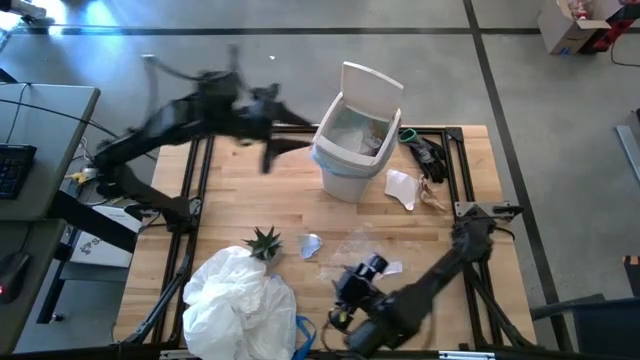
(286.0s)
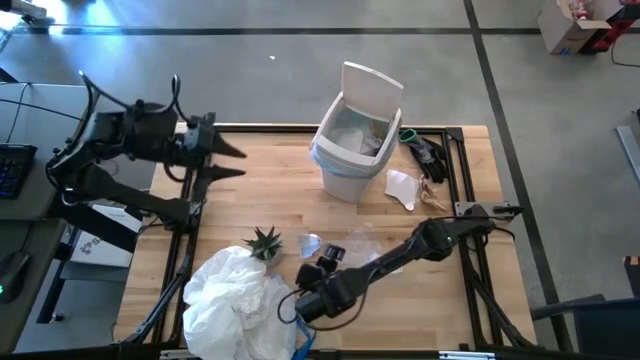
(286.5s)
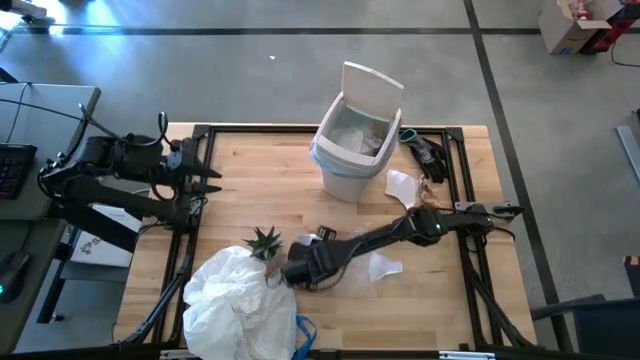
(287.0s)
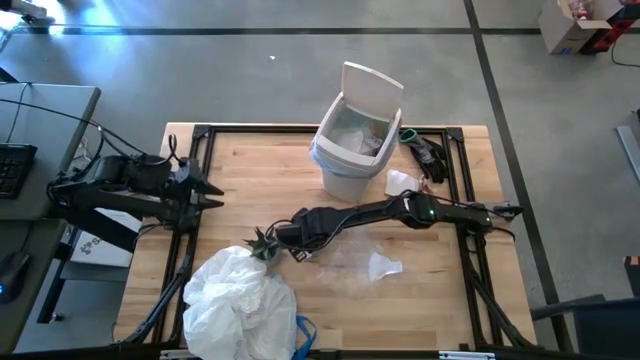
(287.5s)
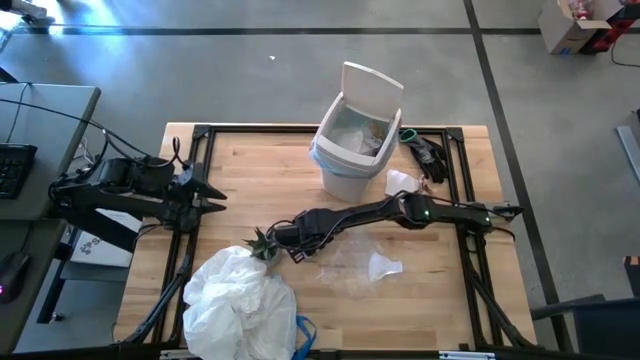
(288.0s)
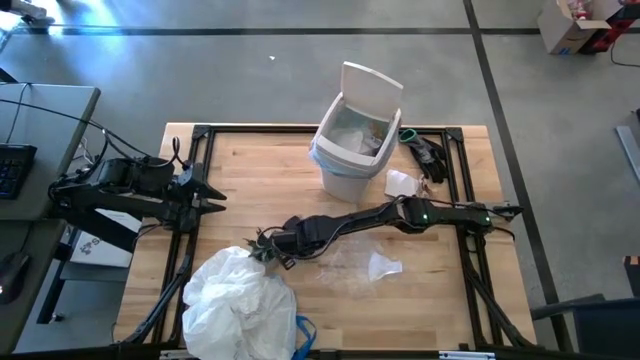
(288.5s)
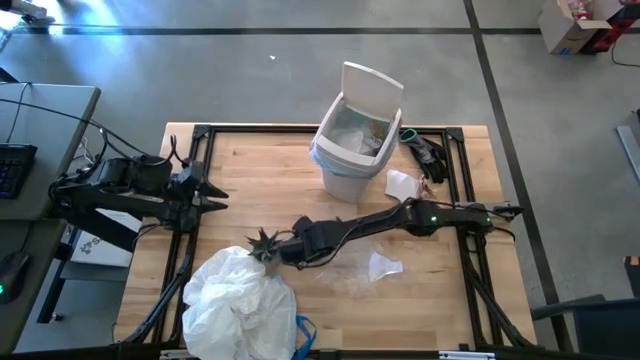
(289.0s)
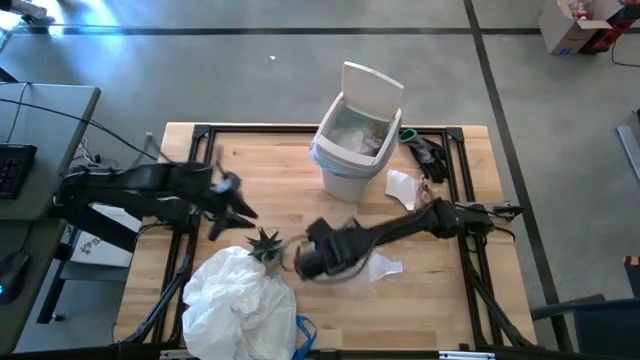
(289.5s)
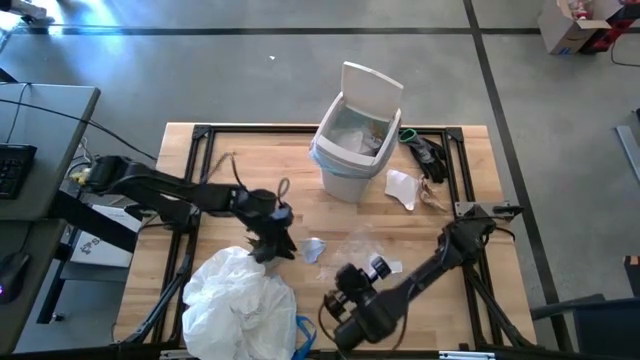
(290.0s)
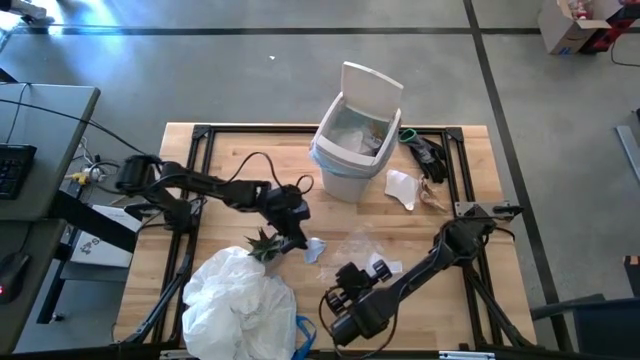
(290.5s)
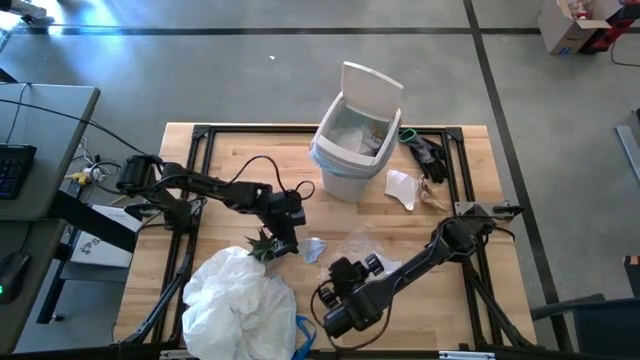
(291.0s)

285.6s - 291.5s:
Task: place trash/remove bag and relplace
Put the white paper into the trash bin

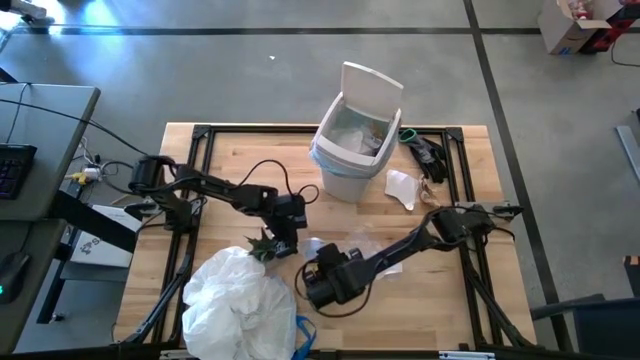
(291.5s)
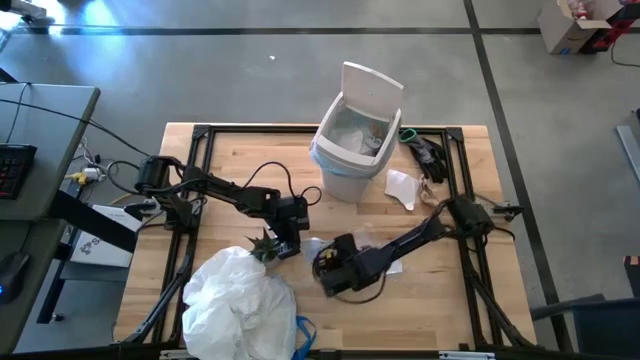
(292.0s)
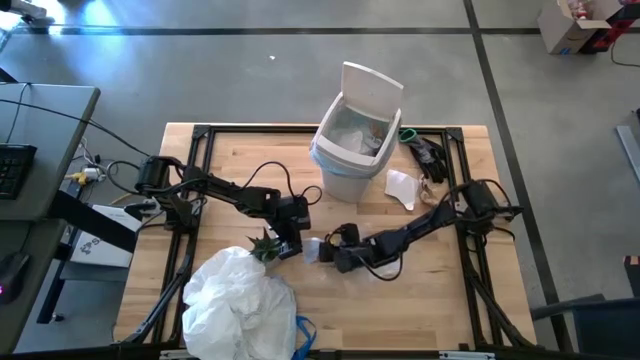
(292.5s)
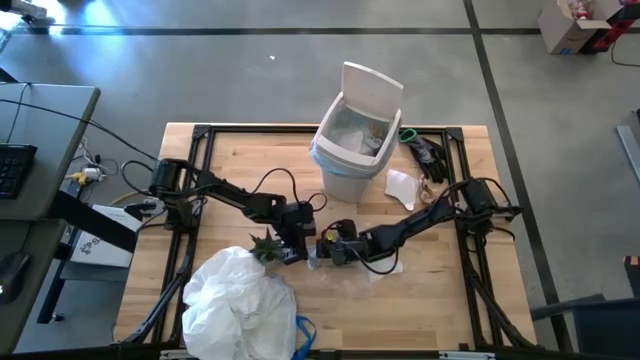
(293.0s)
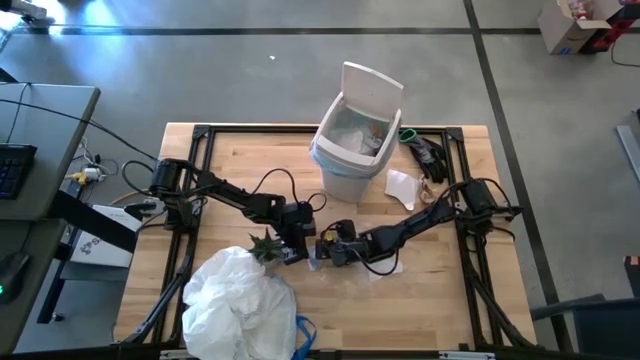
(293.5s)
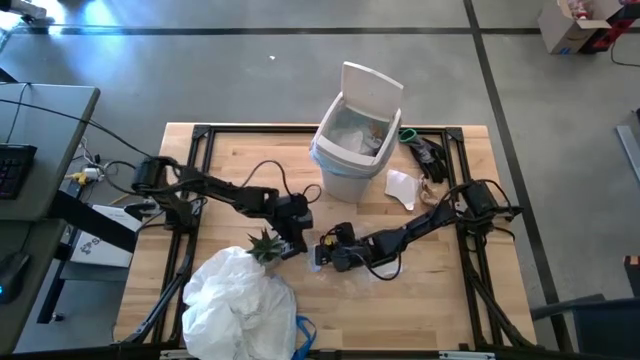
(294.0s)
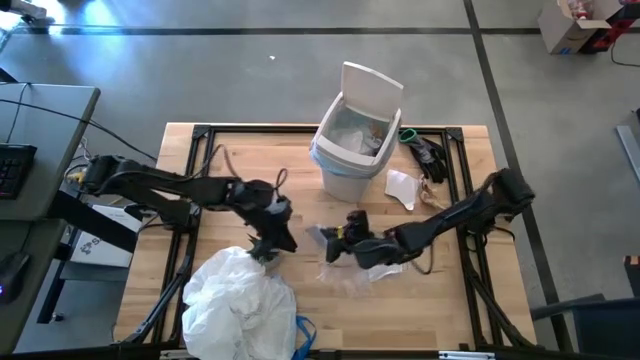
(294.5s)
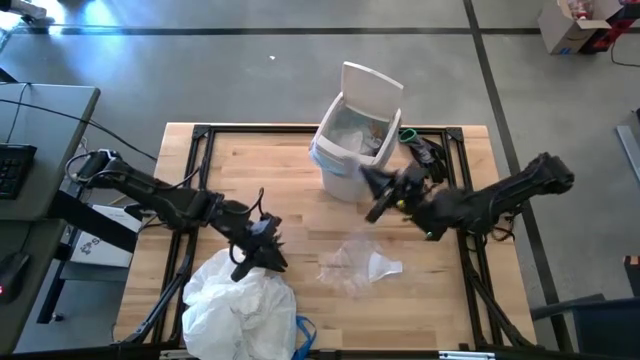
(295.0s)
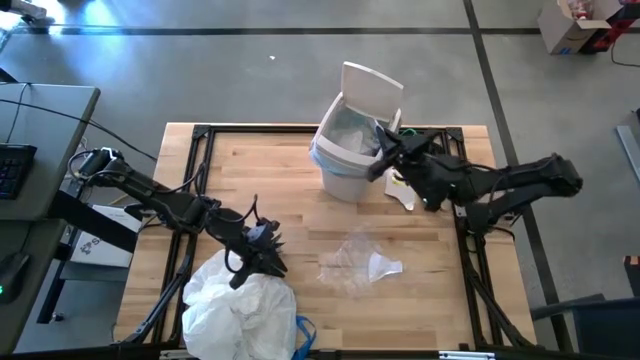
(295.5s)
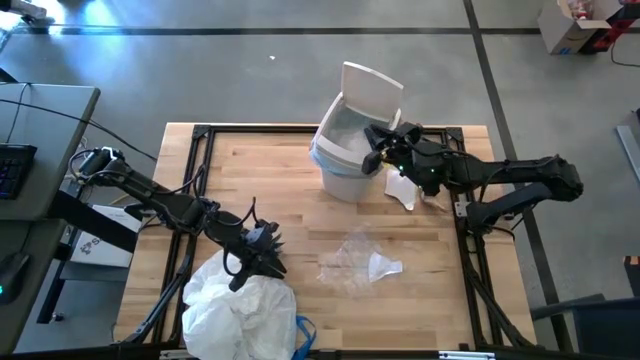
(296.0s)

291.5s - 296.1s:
Put the white paper into the trash bin

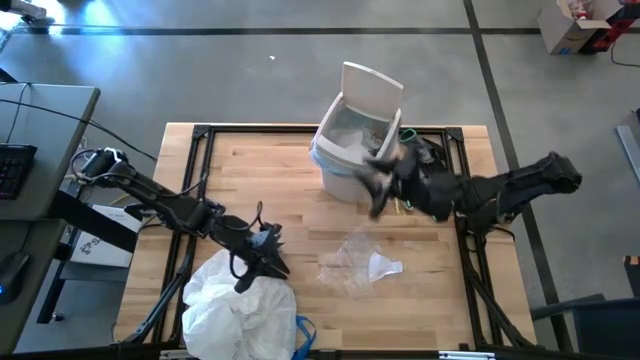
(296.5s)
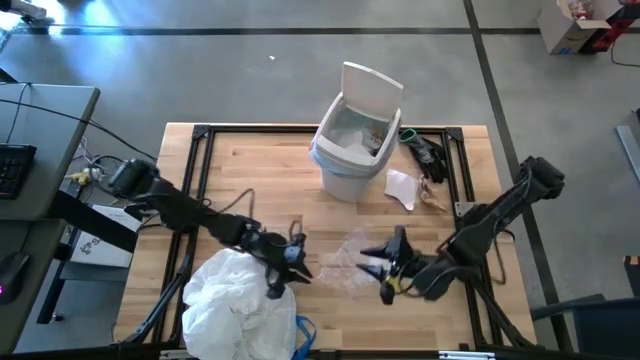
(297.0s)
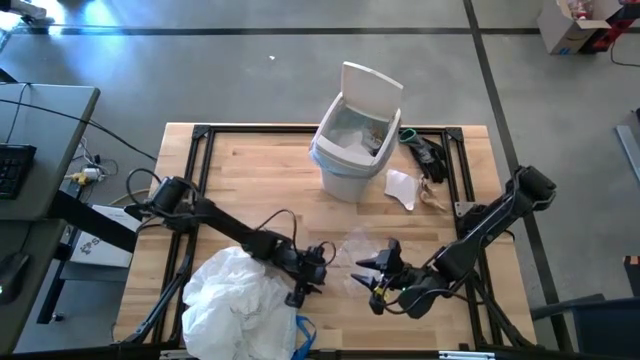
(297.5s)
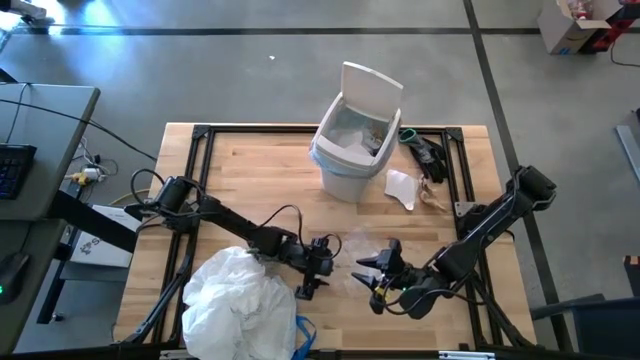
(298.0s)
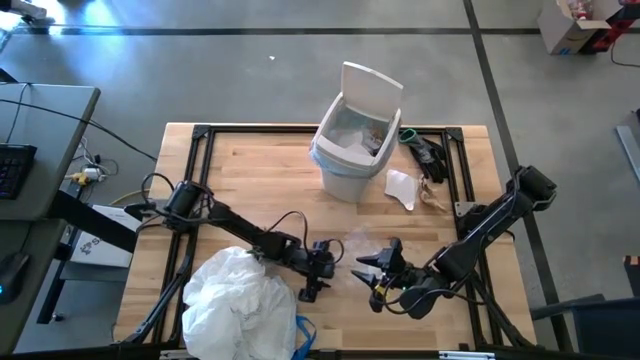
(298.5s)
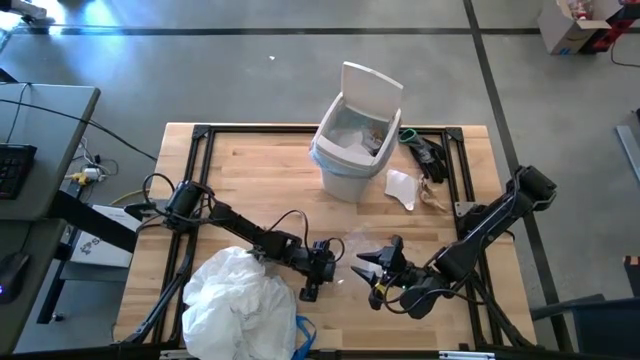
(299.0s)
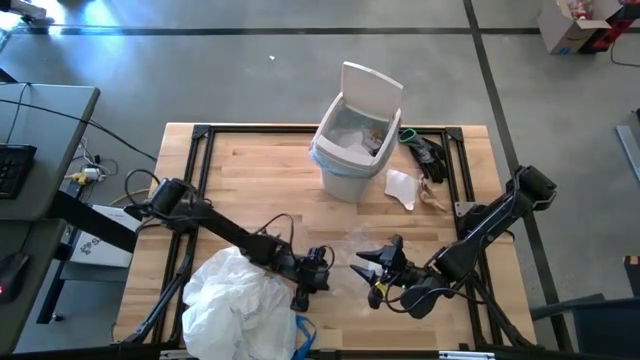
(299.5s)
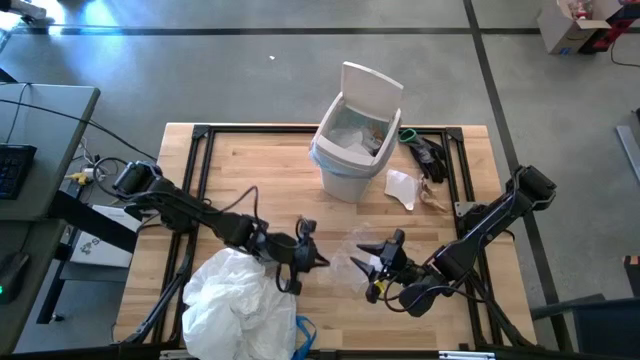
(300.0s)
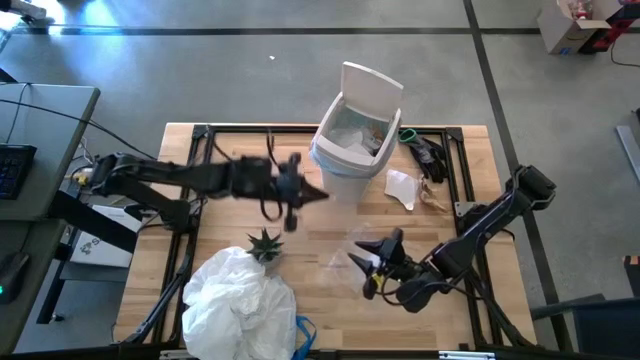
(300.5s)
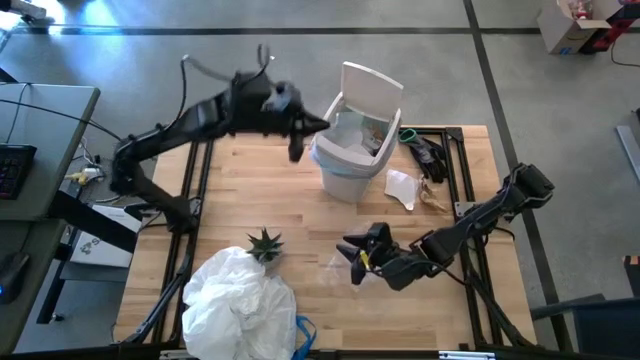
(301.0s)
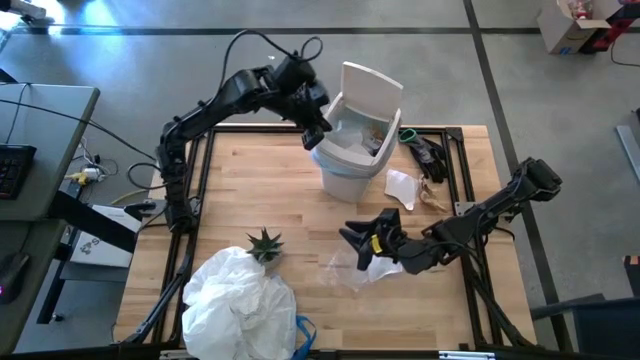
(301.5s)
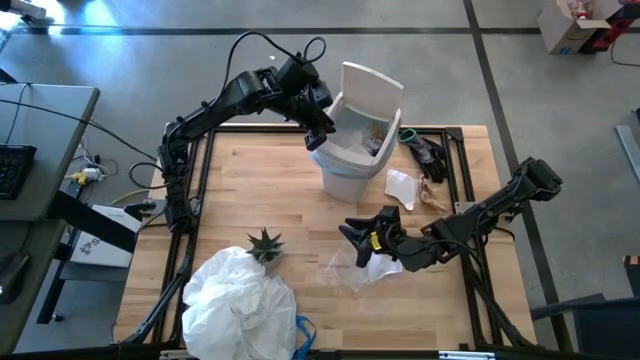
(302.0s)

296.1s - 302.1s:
Put the transparent plastic into the trash bin

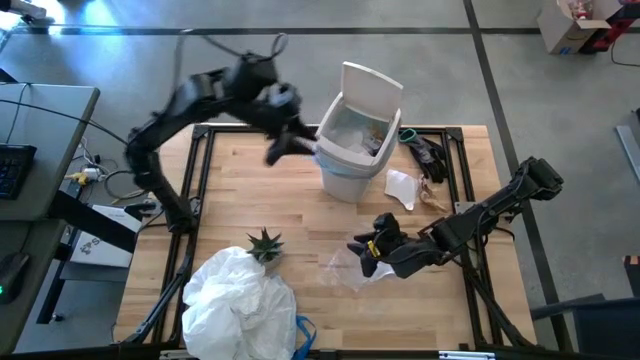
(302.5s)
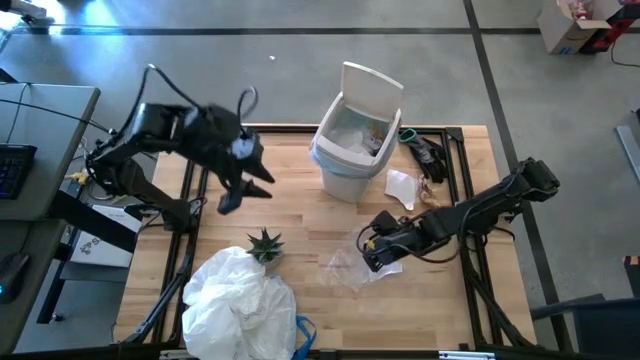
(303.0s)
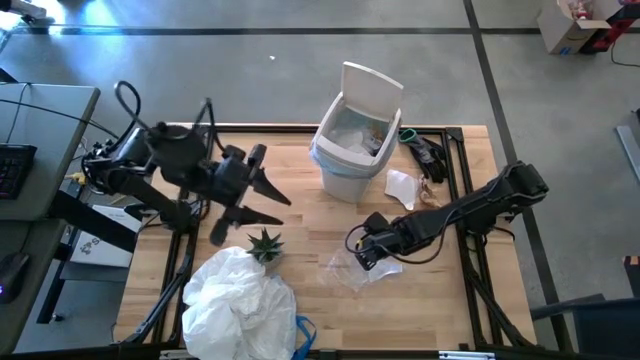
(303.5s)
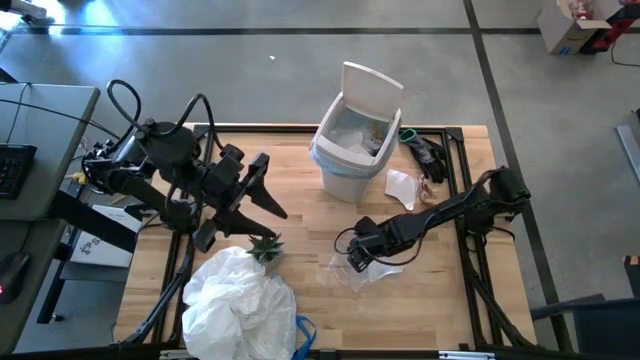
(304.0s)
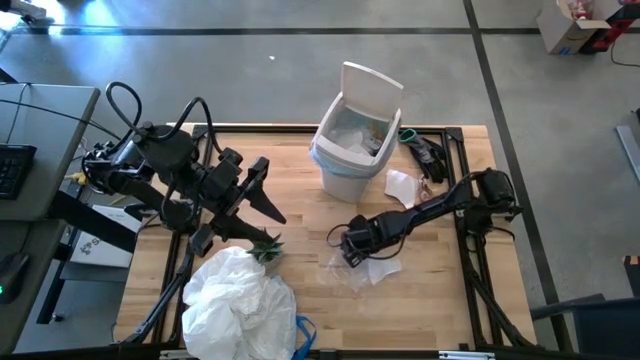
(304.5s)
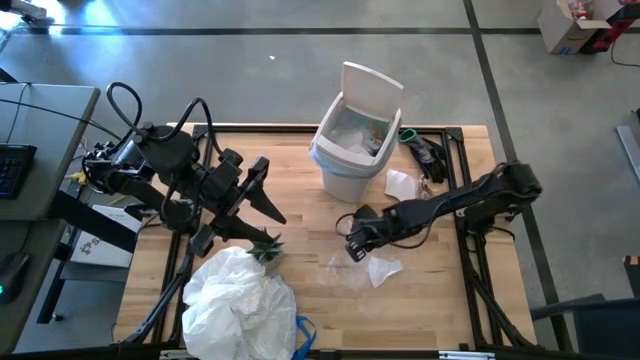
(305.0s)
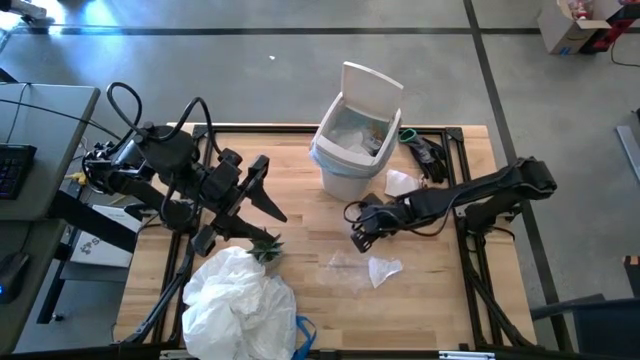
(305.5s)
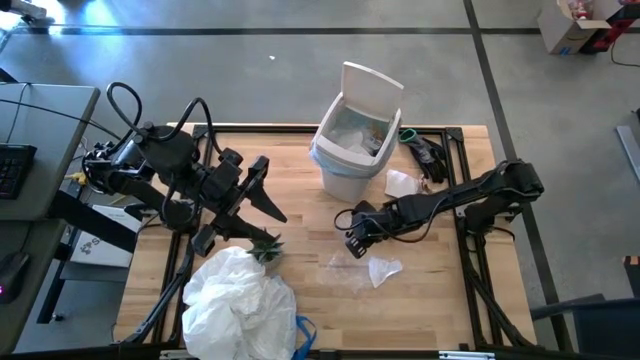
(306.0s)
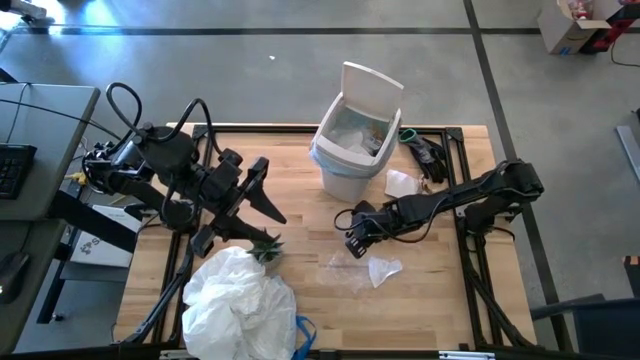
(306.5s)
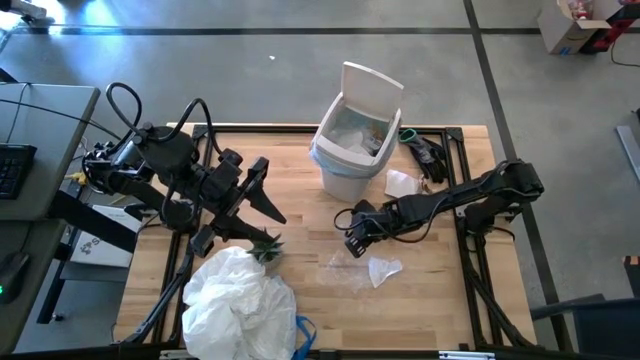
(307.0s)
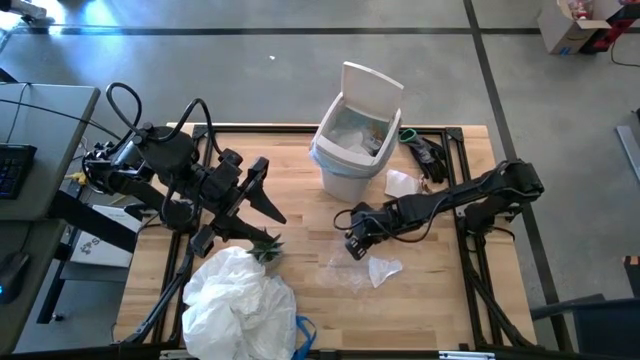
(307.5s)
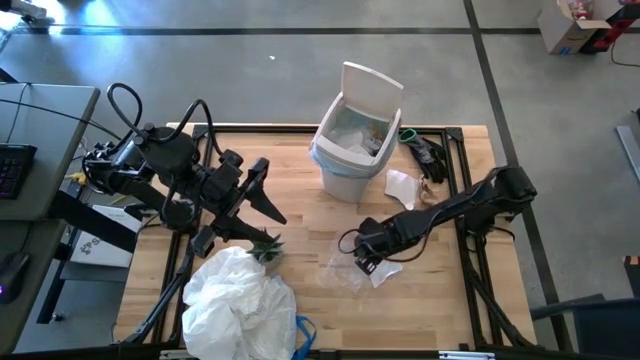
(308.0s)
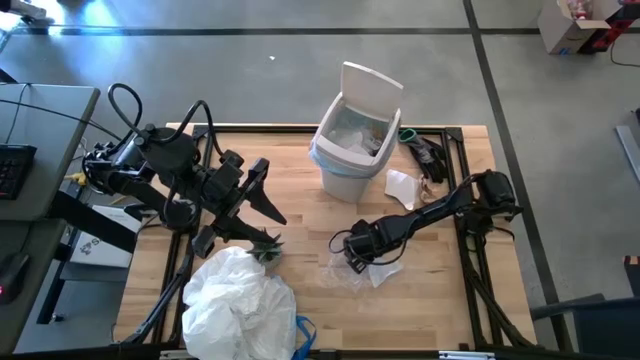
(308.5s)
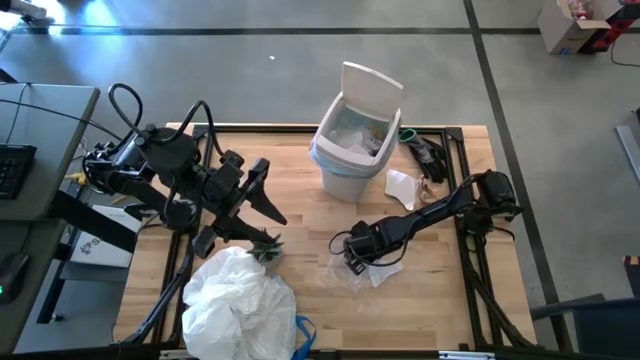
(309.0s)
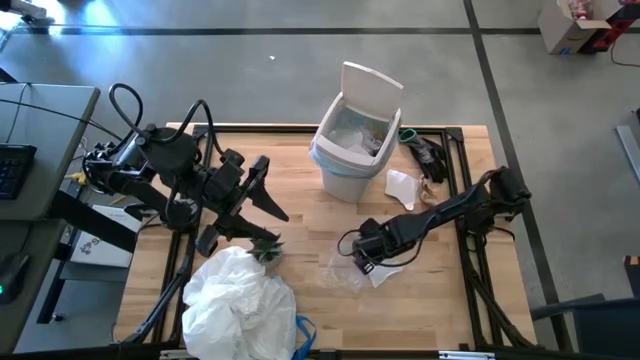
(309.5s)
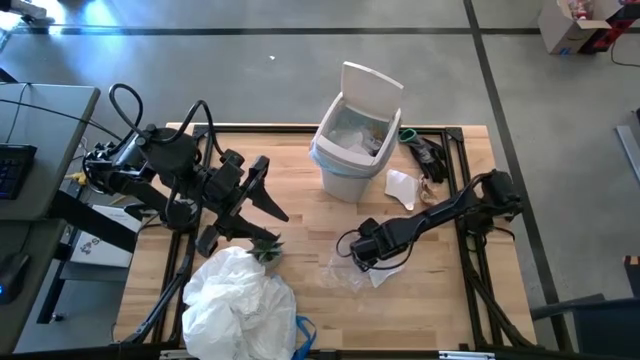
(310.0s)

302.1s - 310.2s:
Put the transparent plastic into the trash bin
